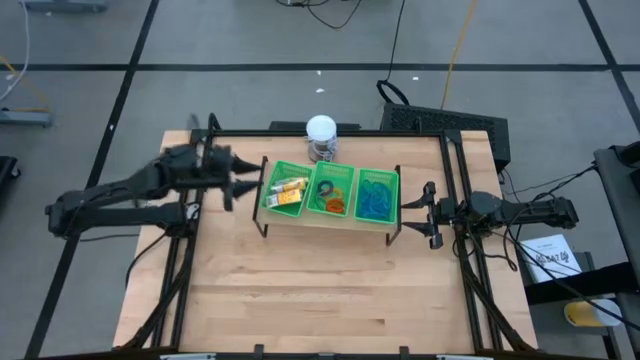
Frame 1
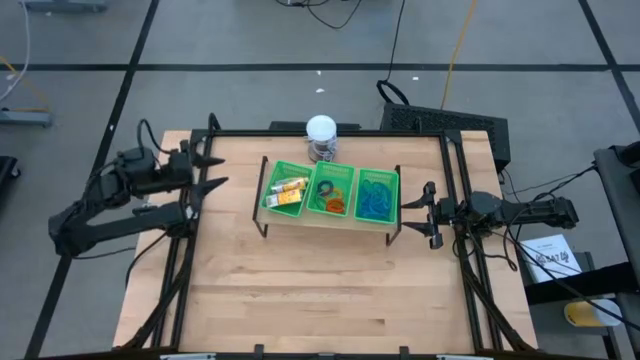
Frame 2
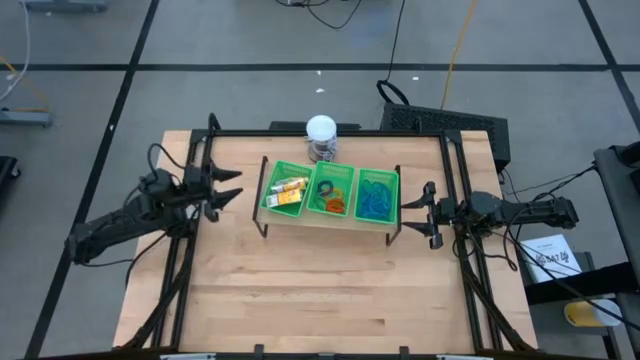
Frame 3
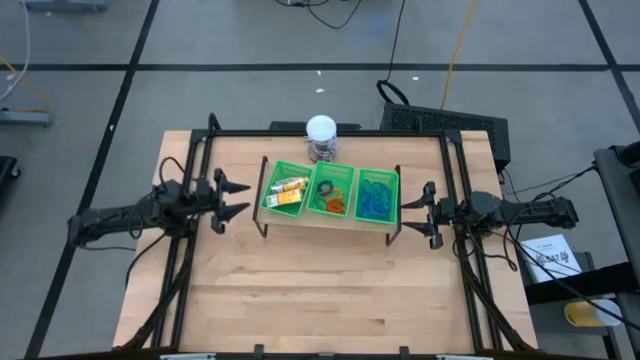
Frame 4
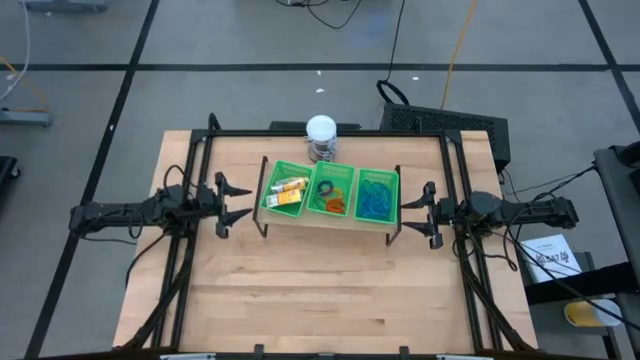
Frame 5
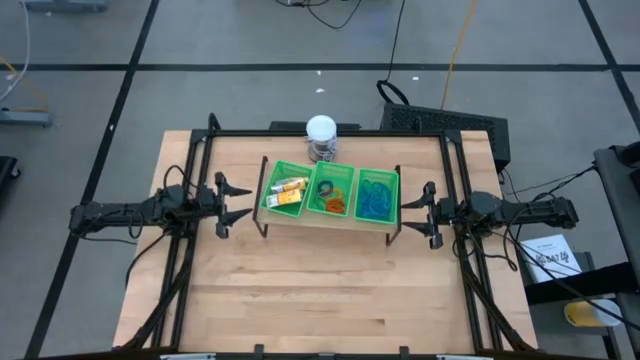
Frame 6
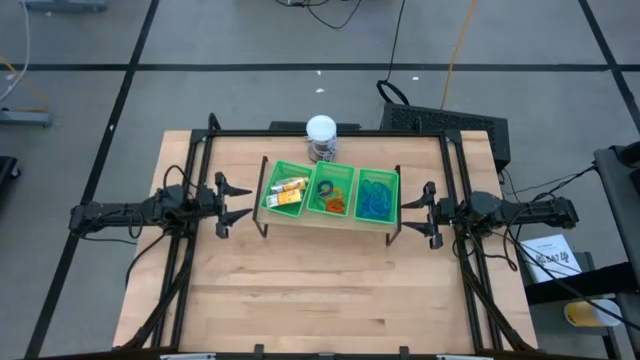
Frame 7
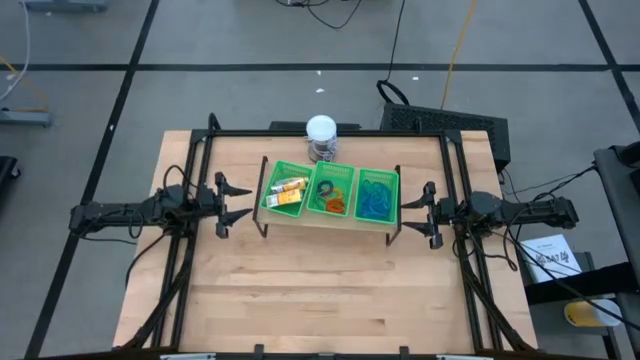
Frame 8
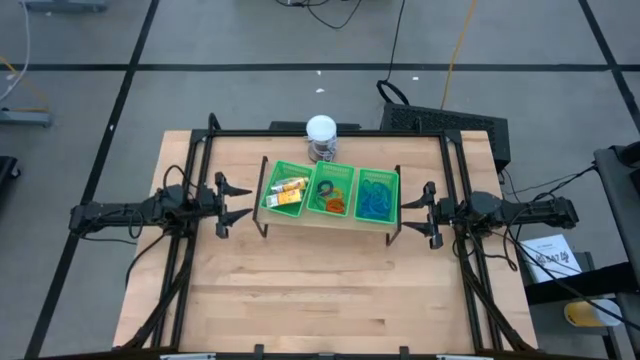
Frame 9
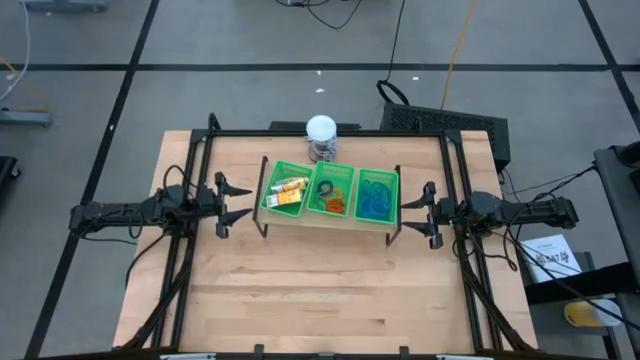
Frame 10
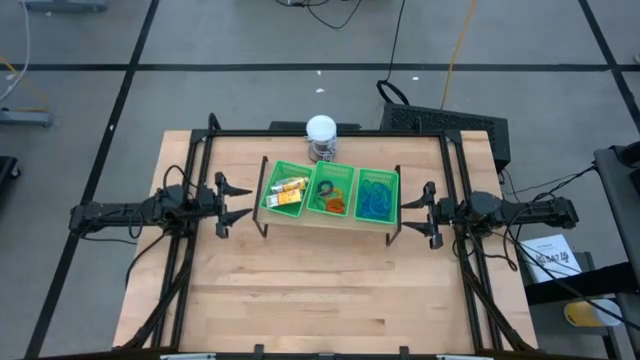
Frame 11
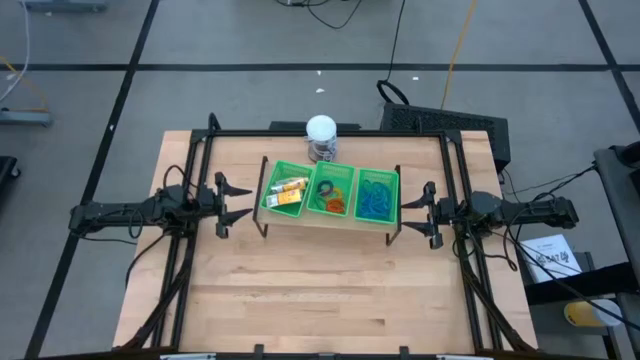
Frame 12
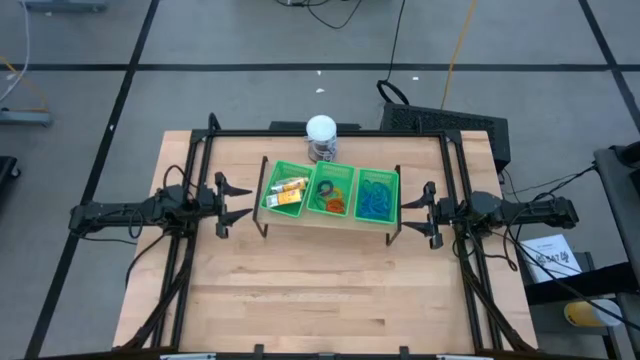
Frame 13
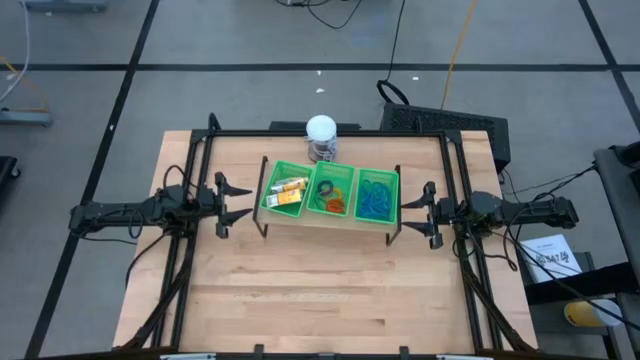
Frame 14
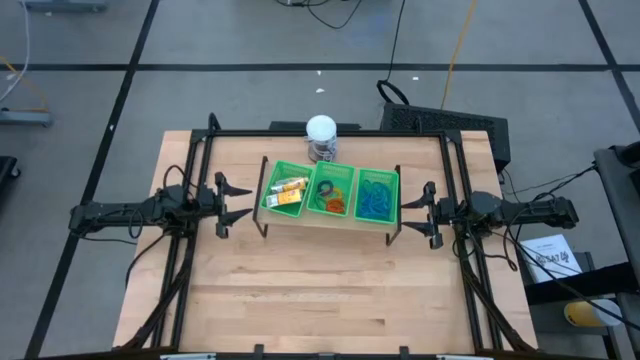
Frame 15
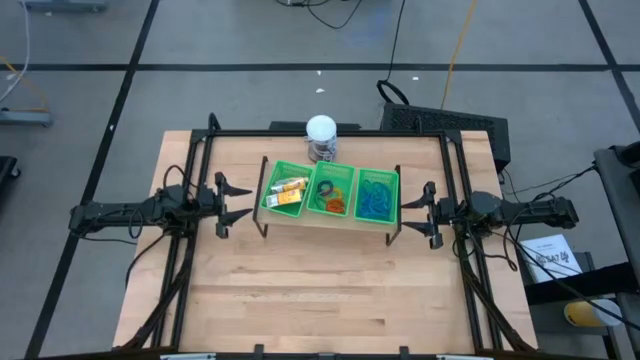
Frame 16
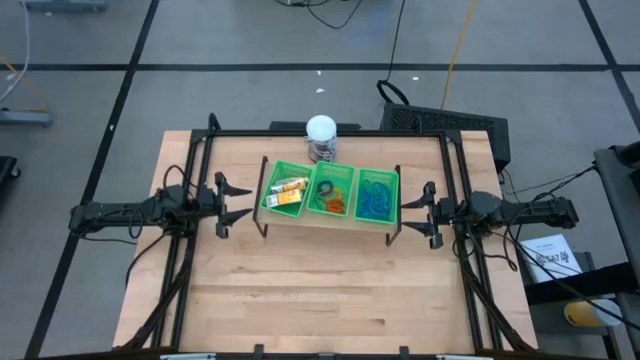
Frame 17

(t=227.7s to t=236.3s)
Task: Pick & Place Office Desk Supplies
Return to Home Position

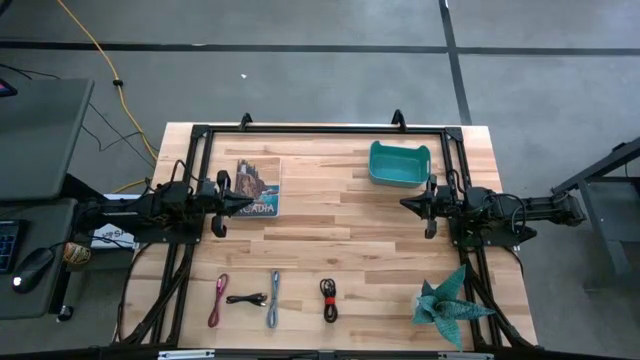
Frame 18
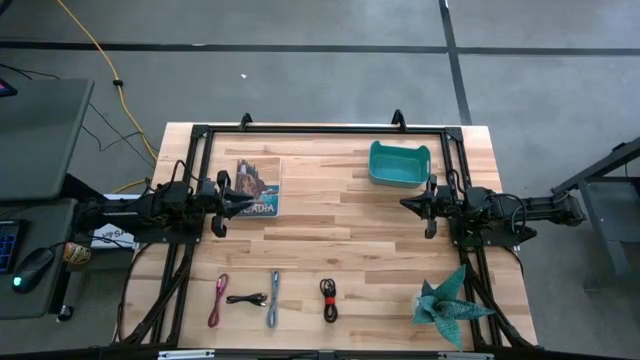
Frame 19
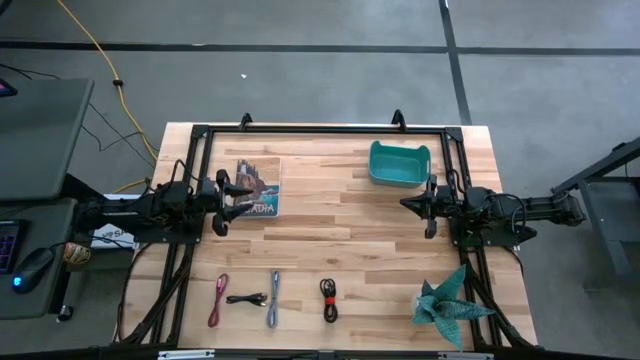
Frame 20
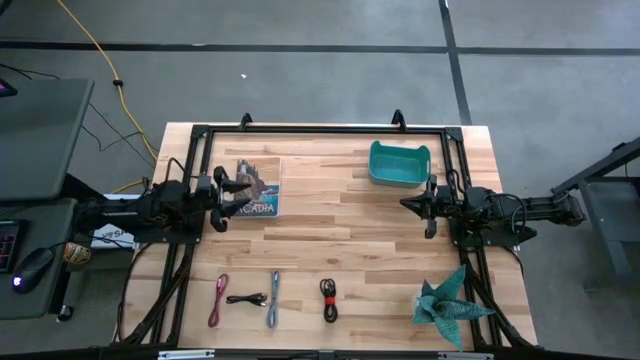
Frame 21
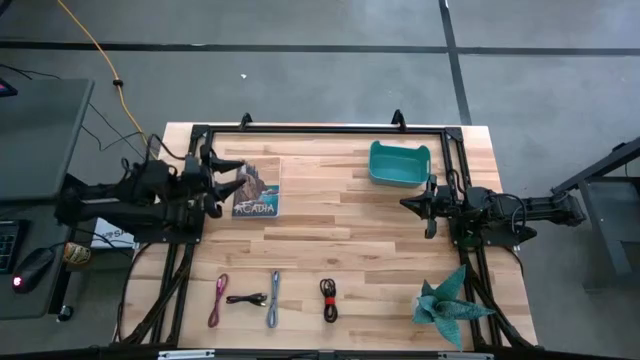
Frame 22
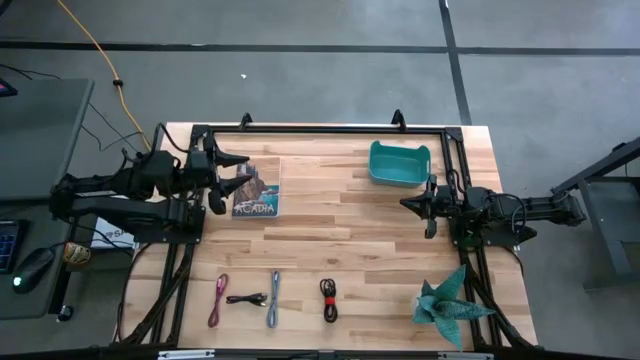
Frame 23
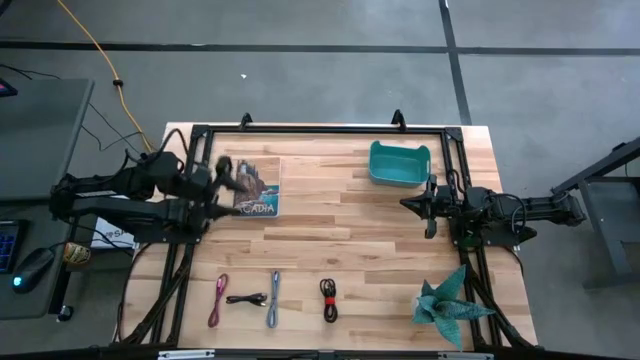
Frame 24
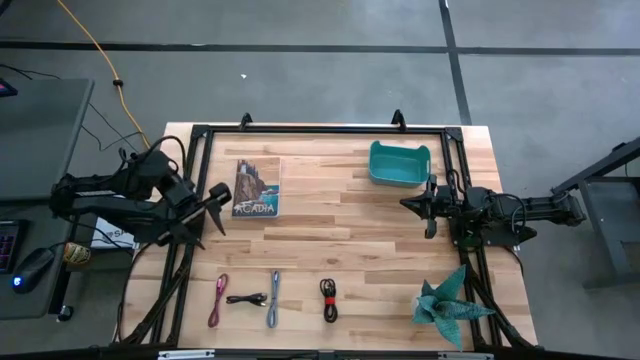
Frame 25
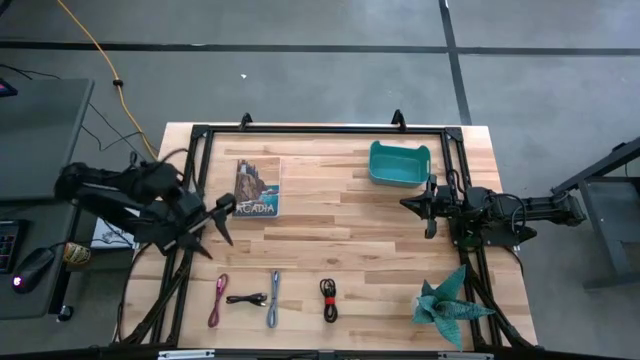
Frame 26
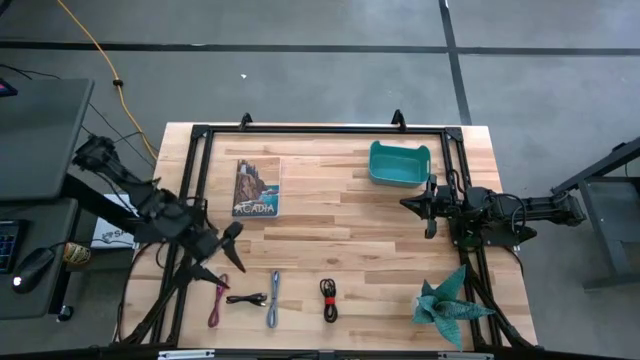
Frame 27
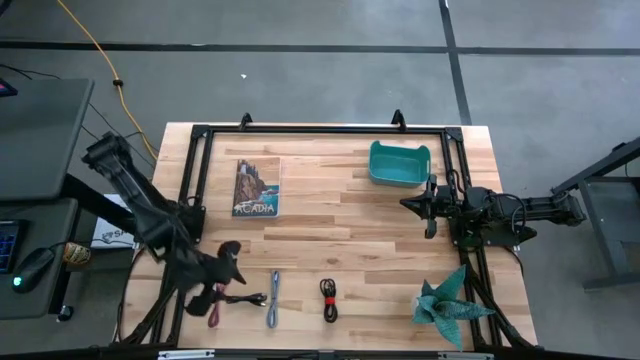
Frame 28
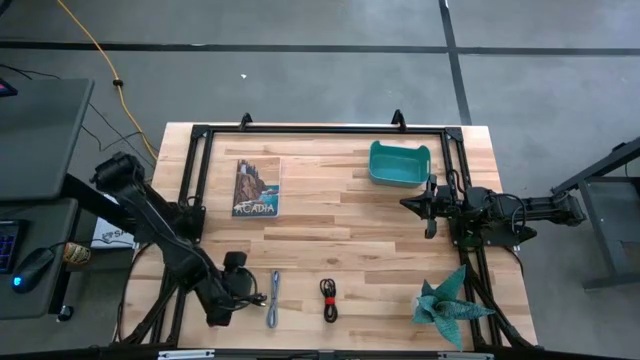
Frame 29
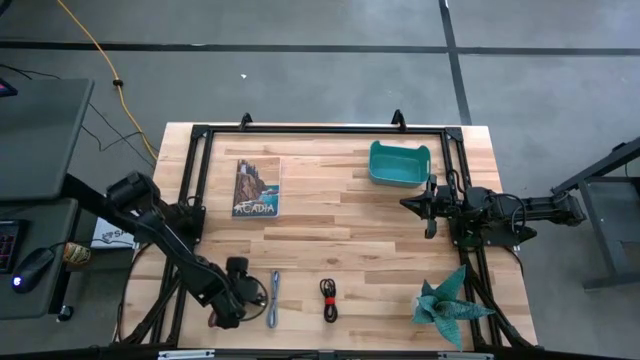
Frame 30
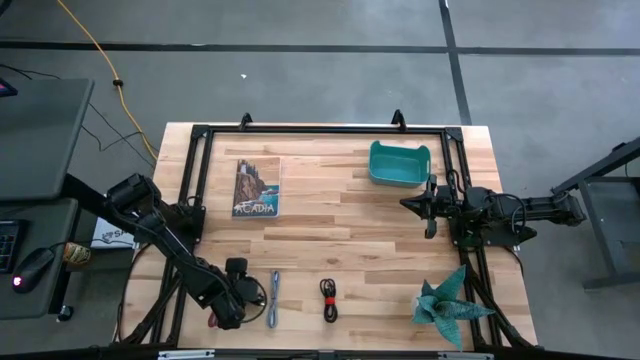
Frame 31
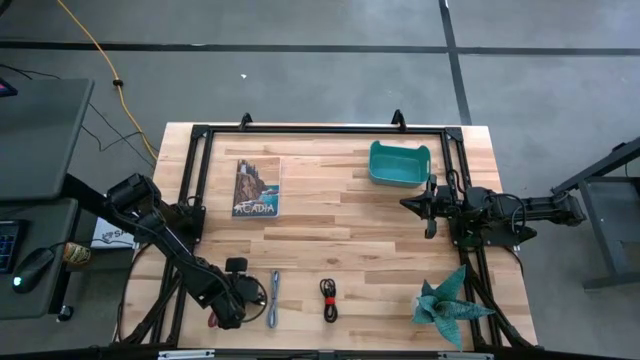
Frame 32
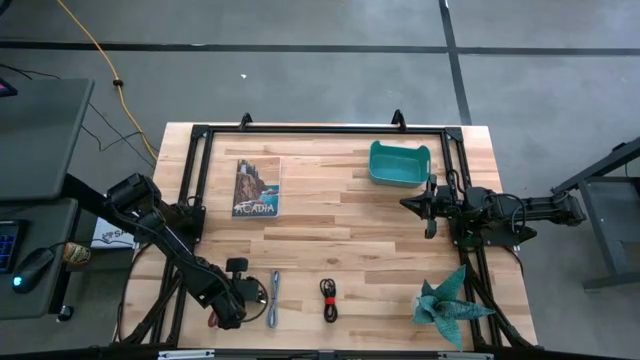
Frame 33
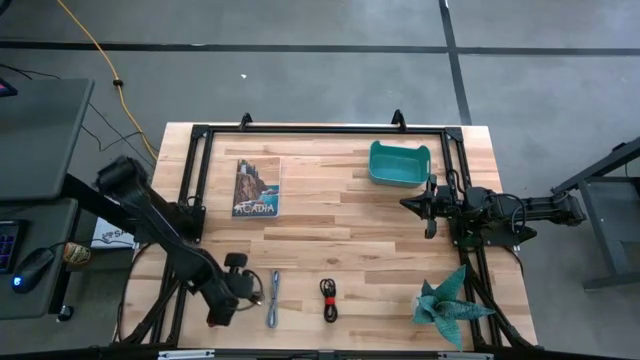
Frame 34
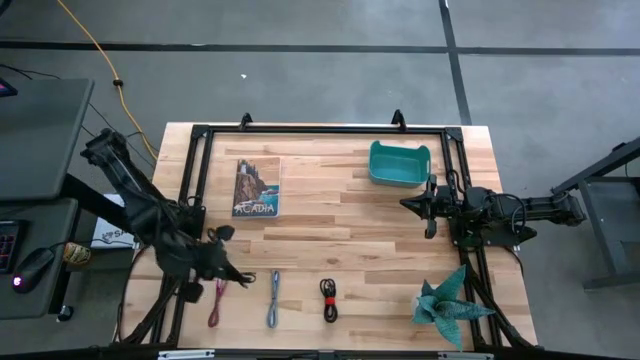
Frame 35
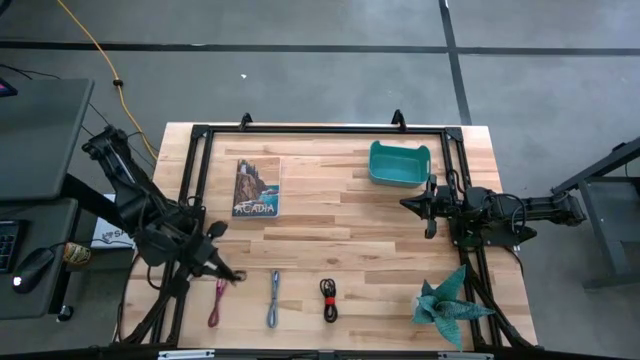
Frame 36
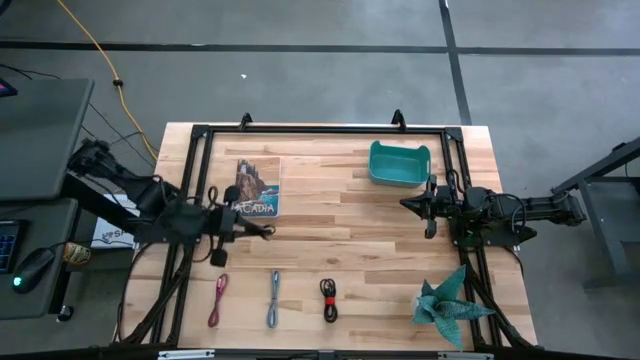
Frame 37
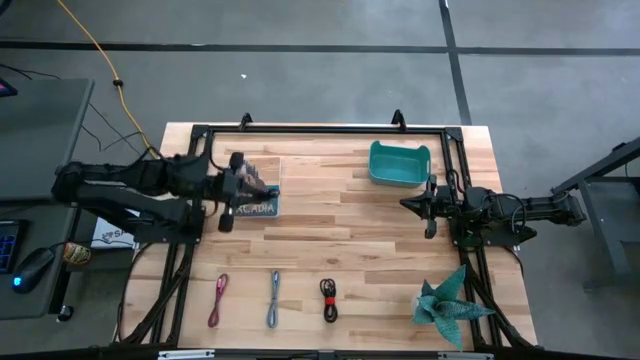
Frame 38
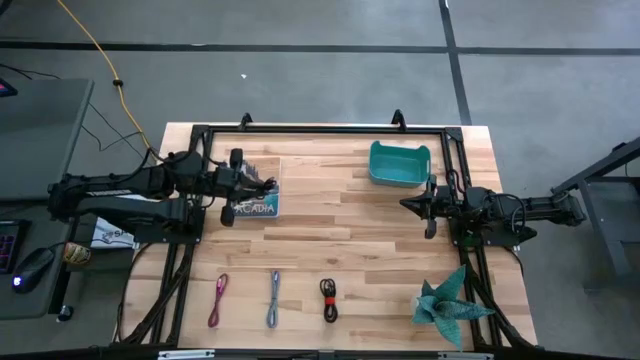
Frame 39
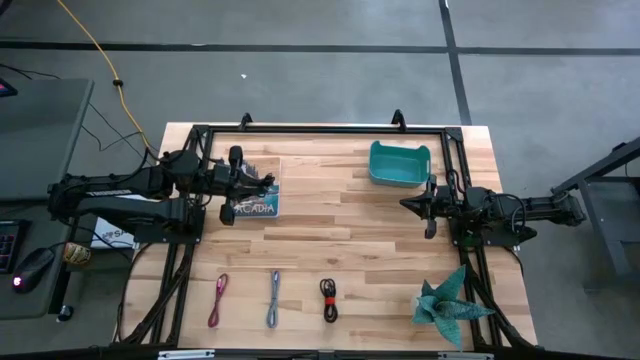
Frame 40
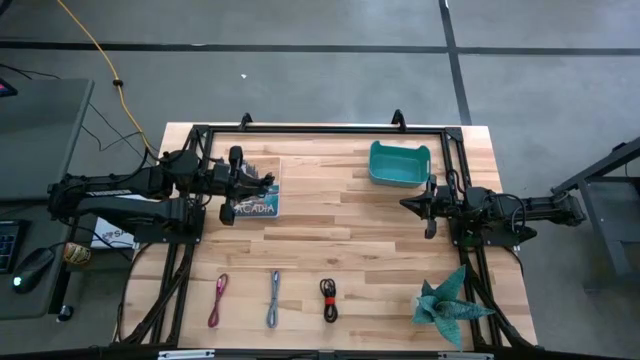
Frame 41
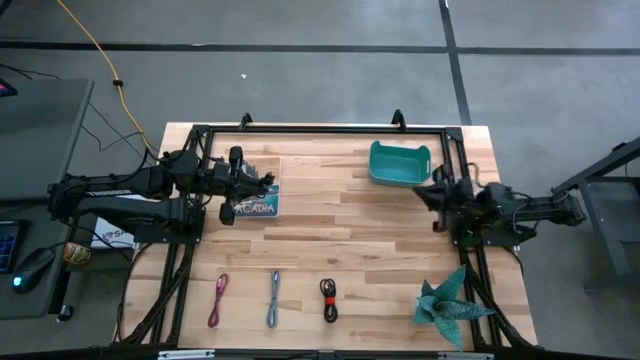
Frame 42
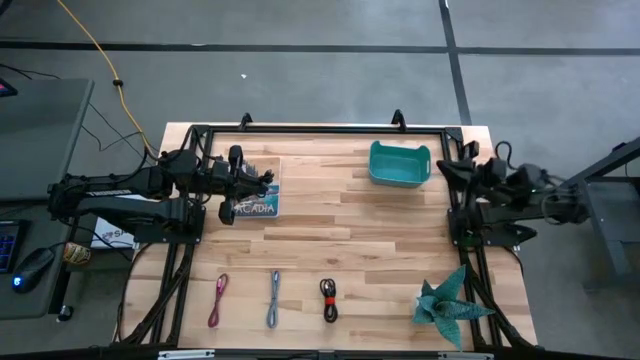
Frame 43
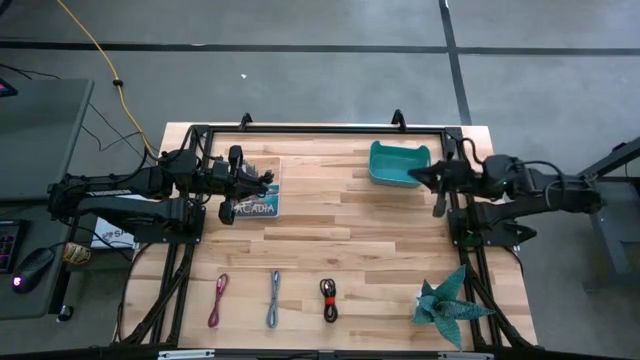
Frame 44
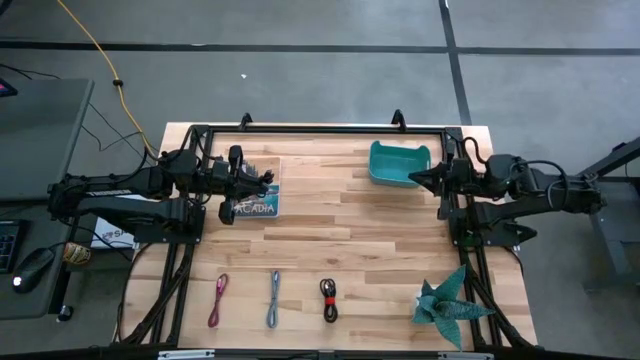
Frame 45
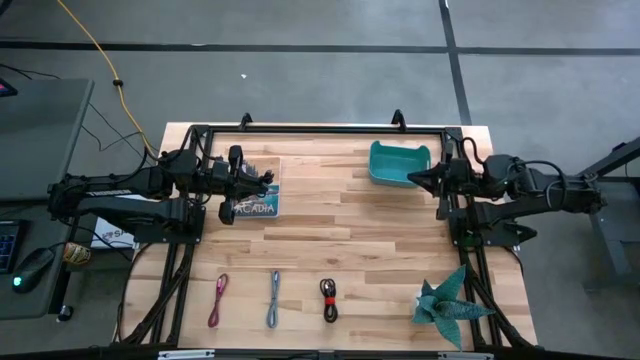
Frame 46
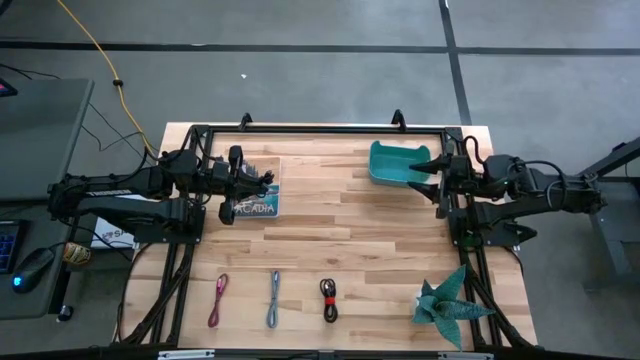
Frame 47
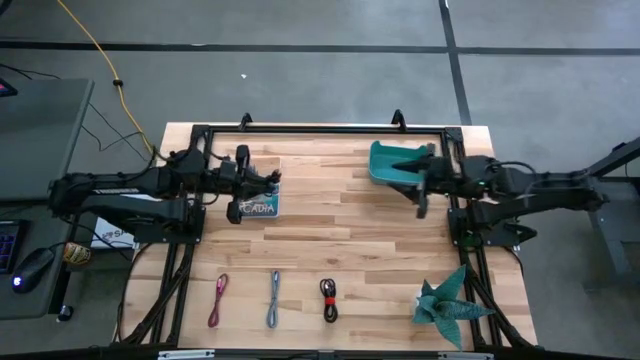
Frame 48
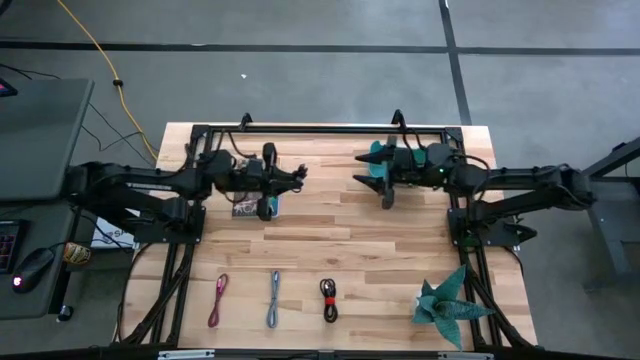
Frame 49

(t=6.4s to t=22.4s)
Task: Pick and place USB-C Cables
Put the left black charger cable into the green bin
